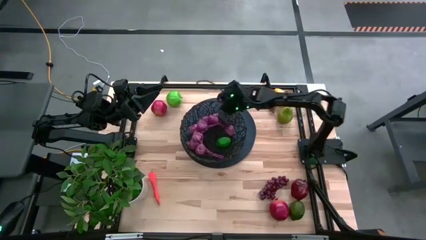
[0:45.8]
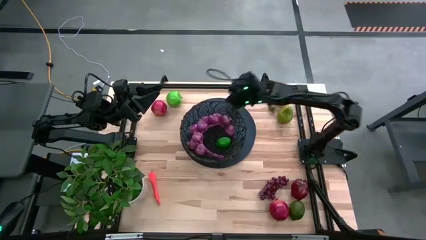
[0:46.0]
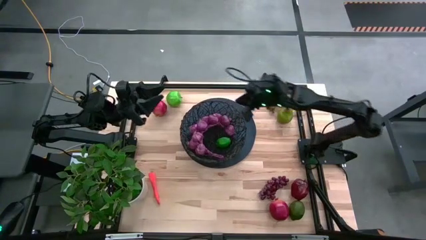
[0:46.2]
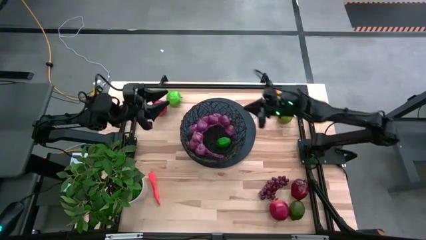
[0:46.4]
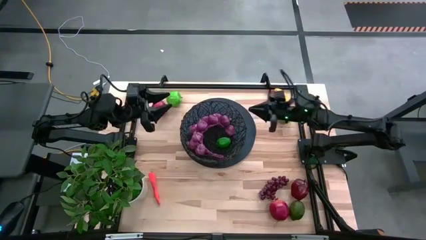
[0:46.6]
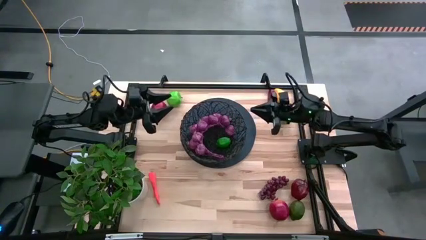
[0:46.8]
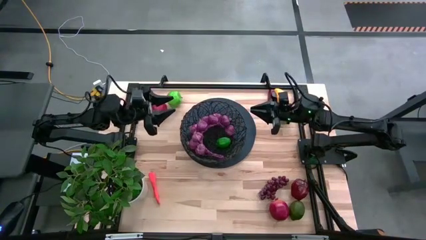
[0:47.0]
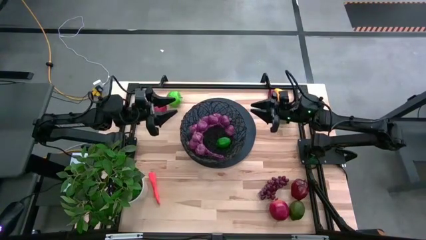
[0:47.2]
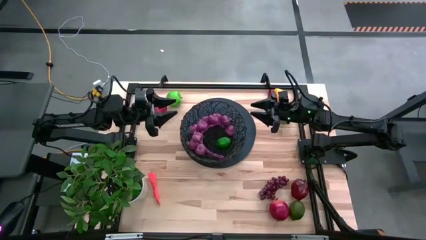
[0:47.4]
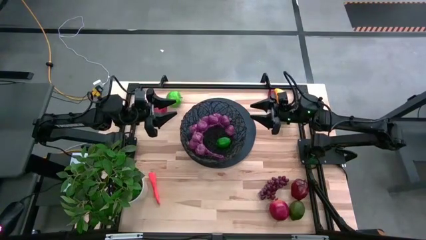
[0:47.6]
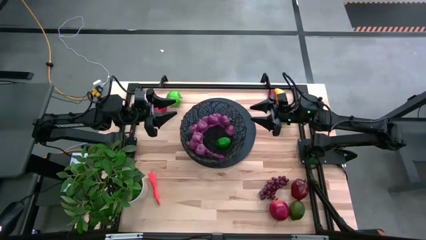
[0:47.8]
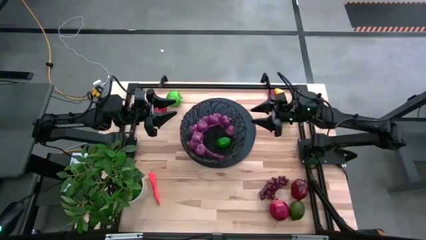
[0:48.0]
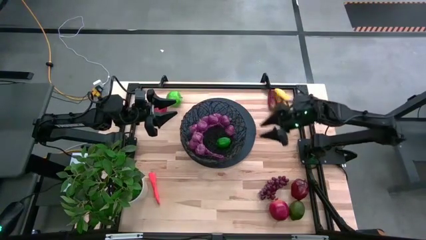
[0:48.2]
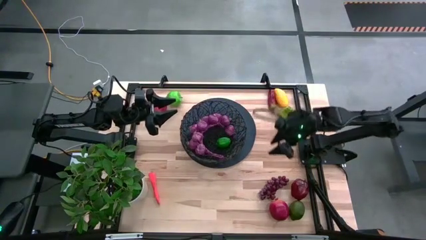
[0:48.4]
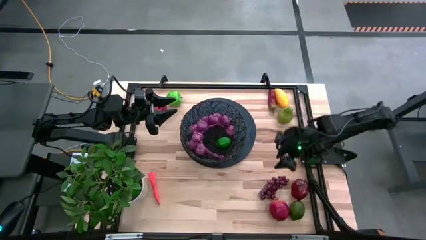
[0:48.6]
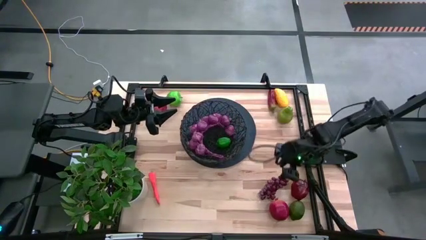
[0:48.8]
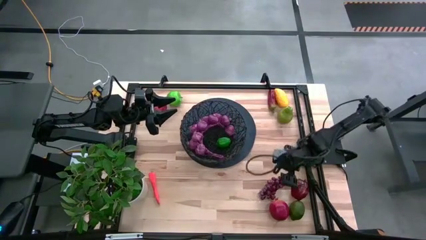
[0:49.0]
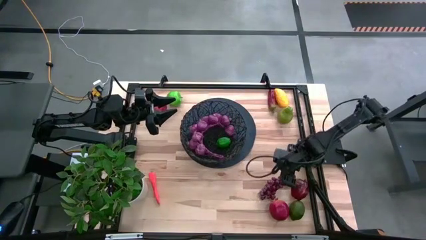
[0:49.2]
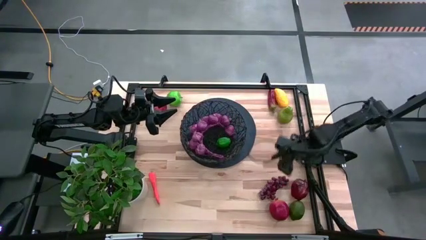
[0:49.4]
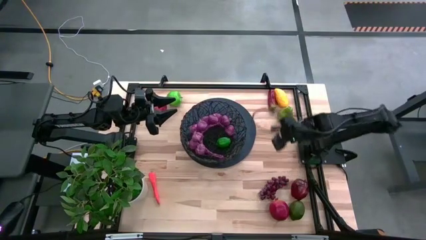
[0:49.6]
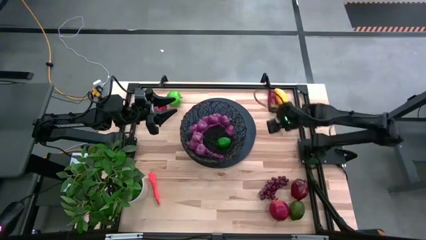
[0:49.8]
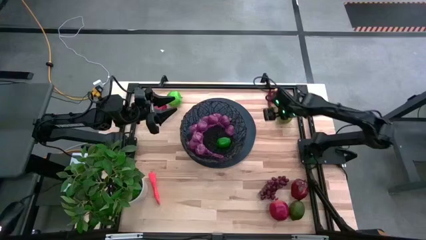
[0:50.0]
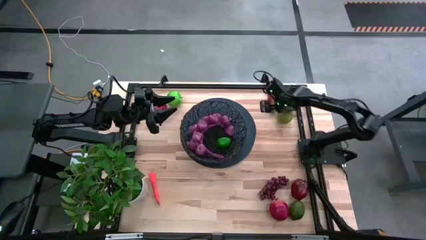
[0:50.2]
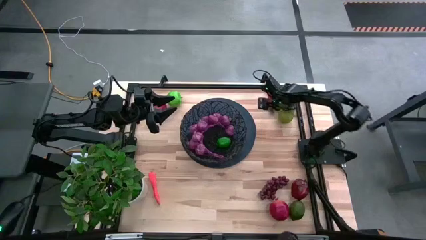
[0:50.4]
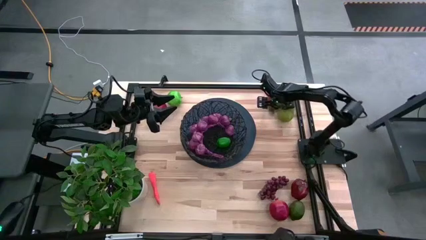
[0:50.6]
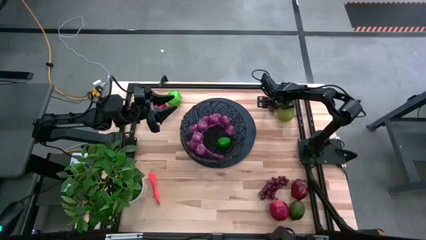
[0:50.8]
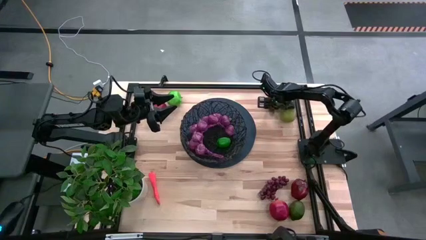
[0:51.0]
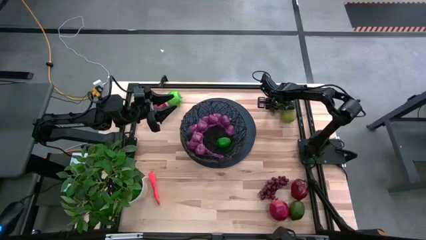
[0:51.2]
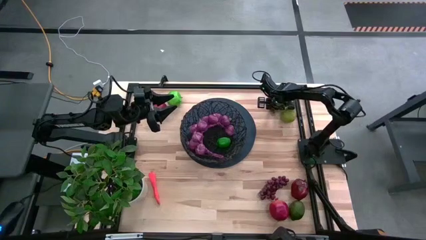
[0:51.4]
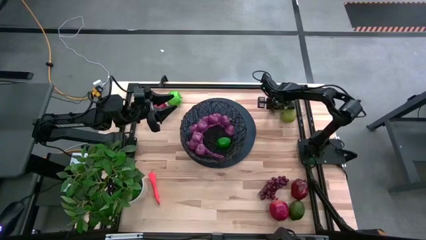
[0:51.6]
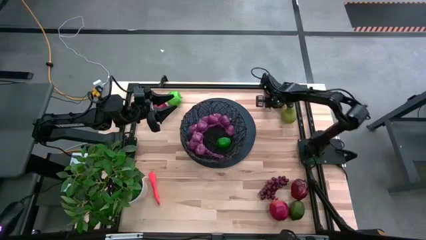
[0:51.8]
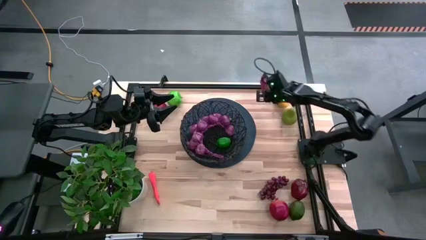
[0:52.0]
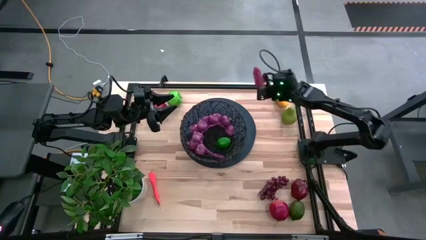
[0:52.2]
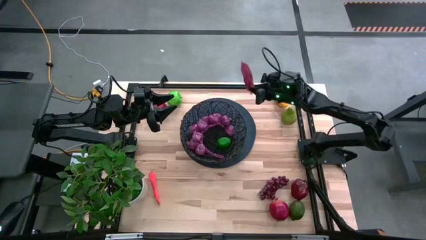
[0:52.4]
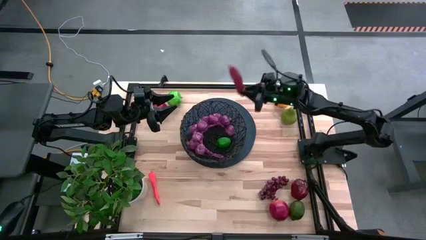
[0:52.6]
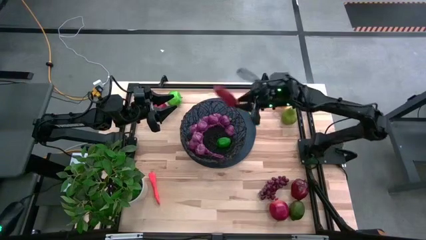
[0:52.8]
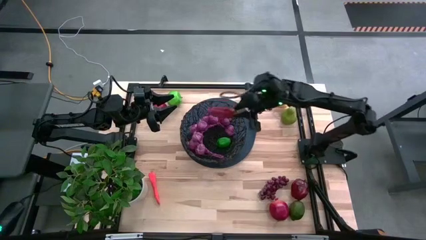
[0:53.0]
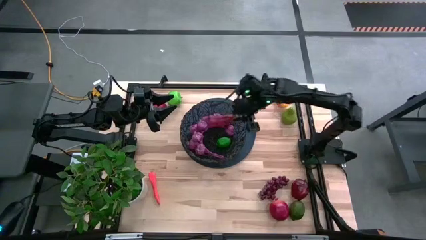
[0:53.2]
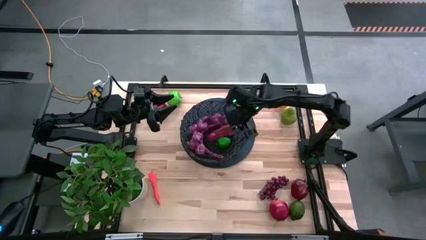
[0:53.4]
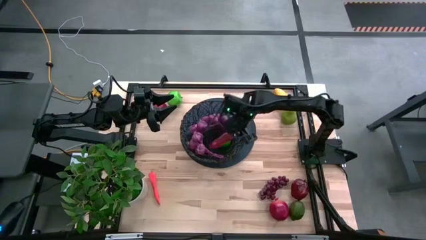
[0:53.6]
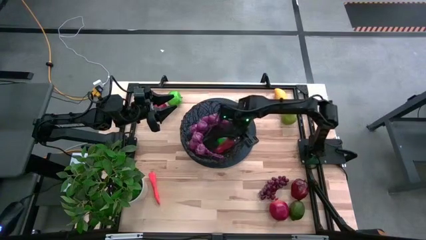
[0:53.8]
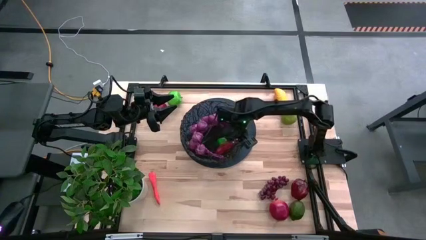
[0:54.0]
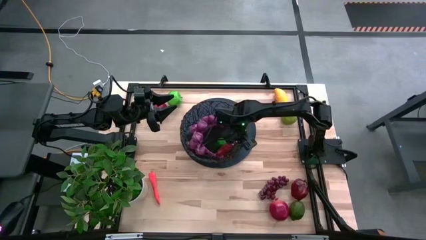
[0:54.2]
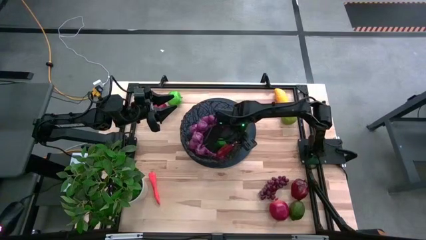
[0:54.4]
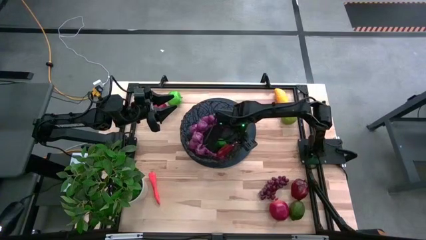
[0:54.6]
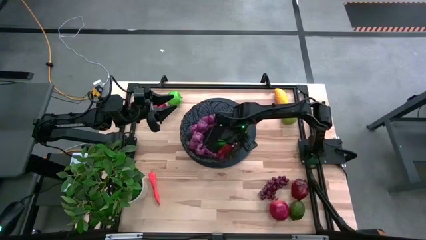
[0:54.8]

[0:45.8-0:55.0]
Task: Build produce basket
Put the red chili pepper into basket

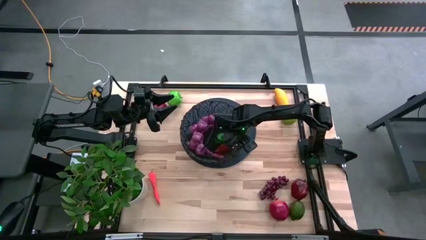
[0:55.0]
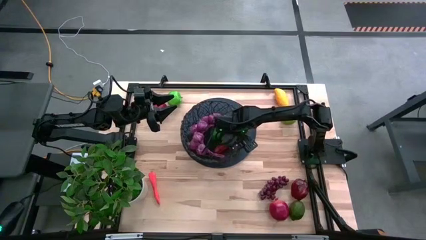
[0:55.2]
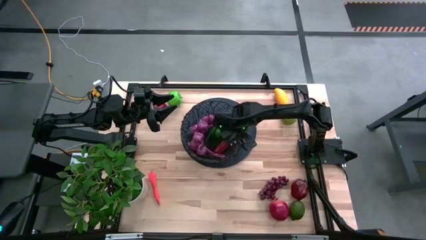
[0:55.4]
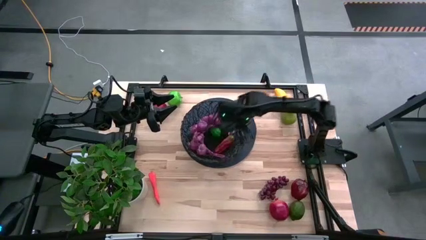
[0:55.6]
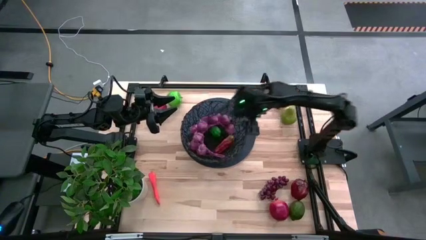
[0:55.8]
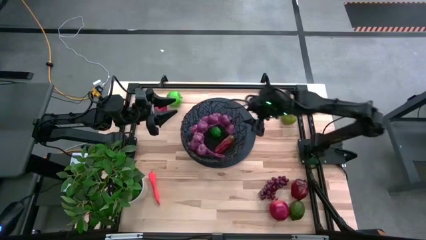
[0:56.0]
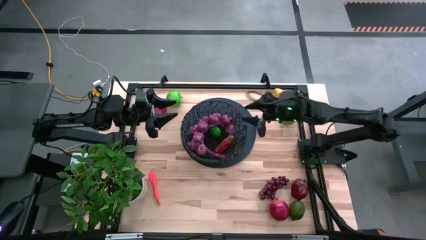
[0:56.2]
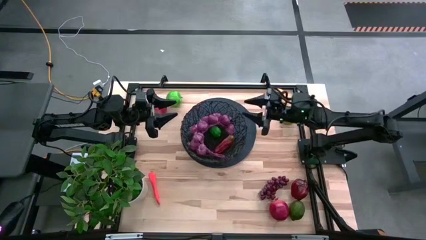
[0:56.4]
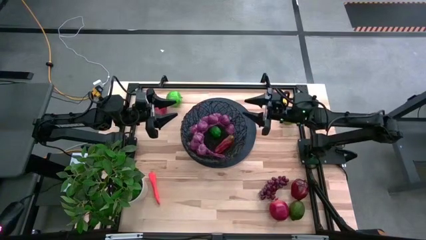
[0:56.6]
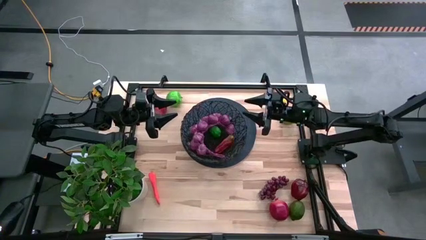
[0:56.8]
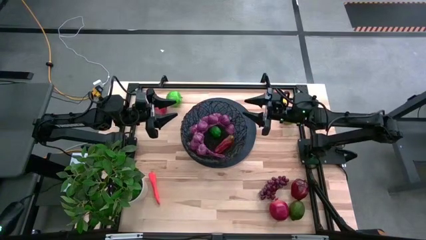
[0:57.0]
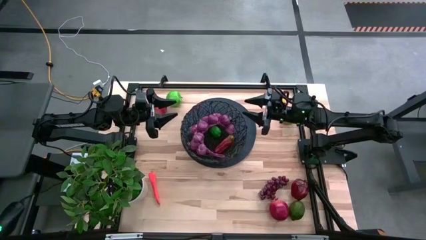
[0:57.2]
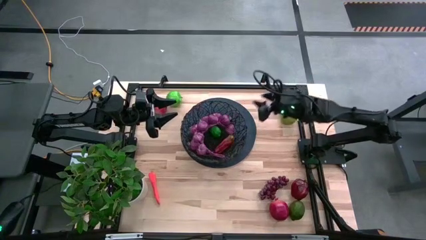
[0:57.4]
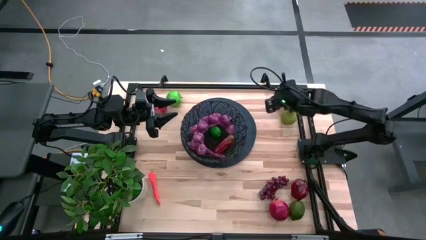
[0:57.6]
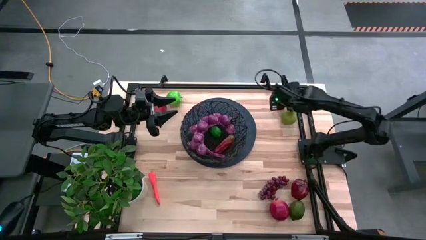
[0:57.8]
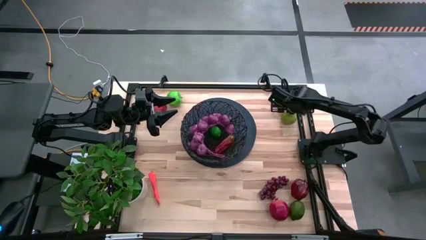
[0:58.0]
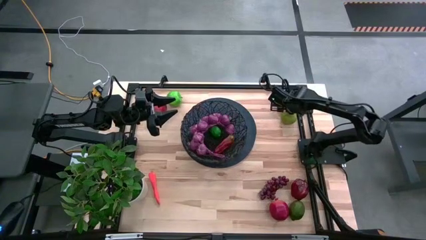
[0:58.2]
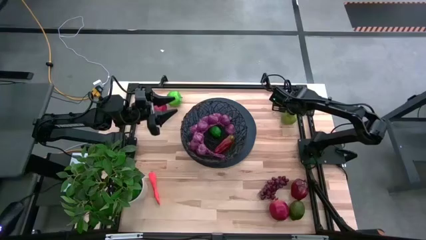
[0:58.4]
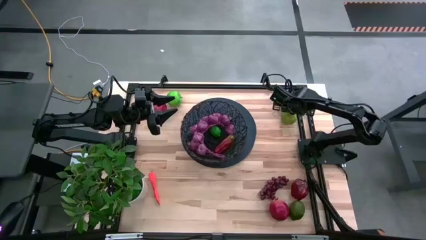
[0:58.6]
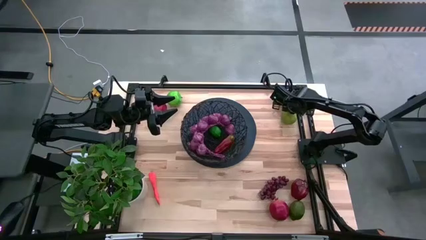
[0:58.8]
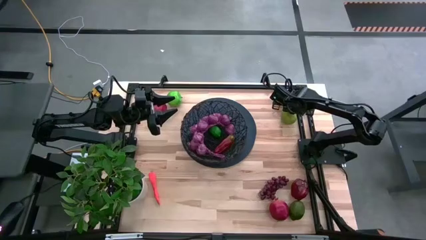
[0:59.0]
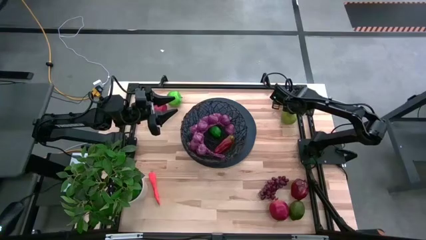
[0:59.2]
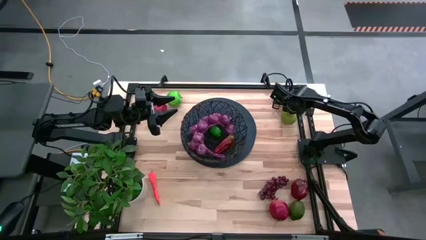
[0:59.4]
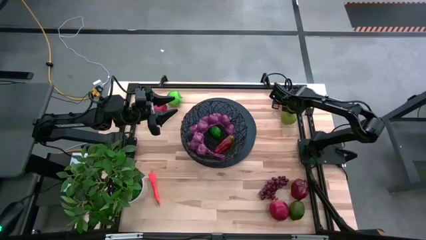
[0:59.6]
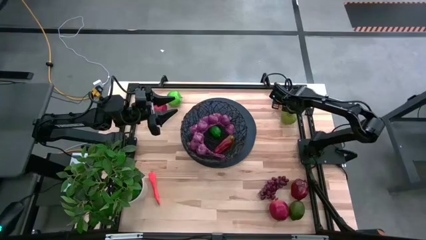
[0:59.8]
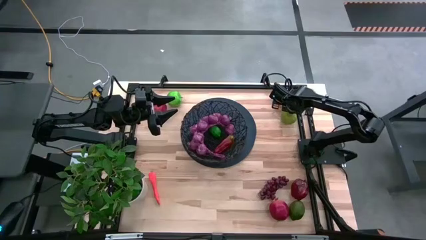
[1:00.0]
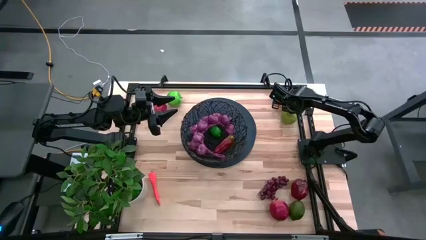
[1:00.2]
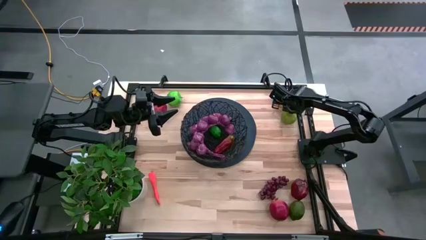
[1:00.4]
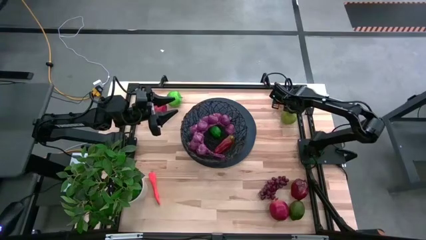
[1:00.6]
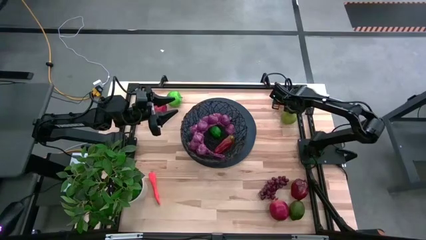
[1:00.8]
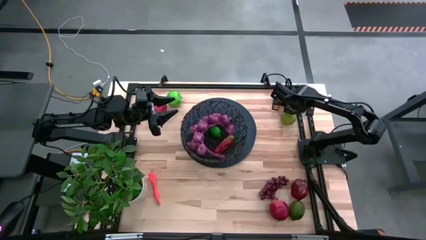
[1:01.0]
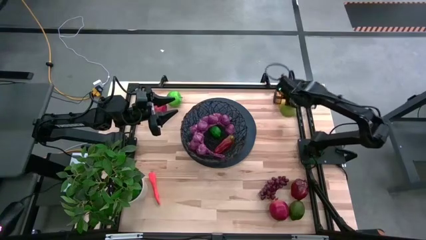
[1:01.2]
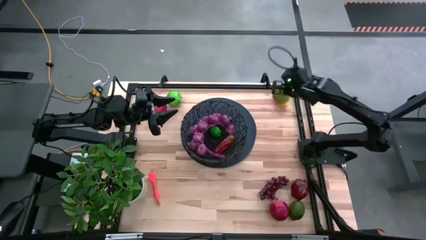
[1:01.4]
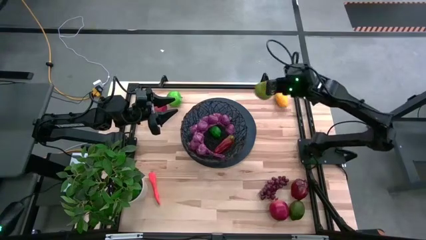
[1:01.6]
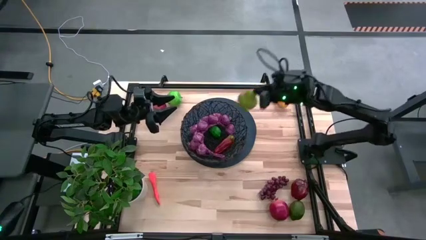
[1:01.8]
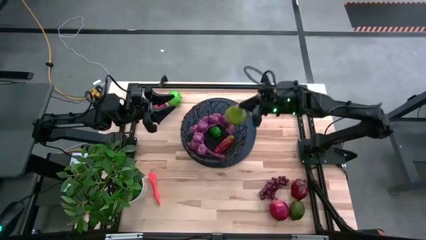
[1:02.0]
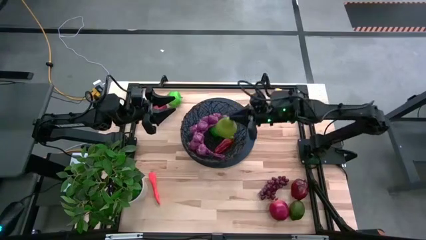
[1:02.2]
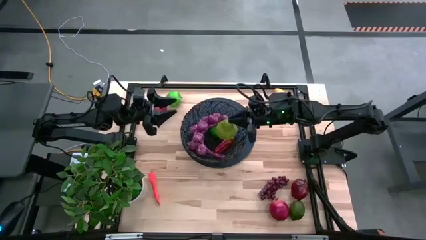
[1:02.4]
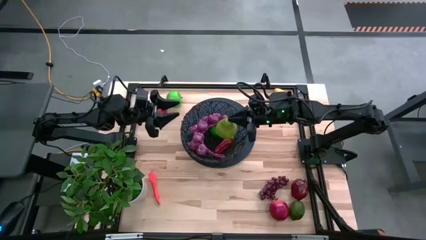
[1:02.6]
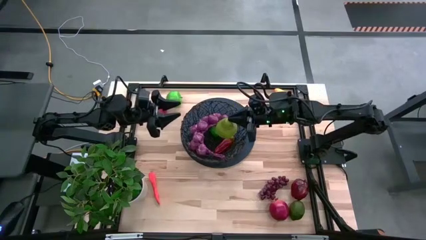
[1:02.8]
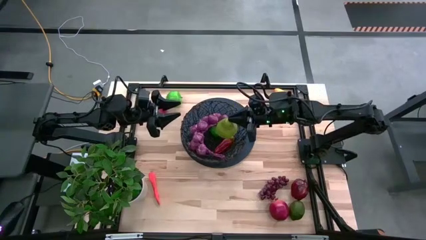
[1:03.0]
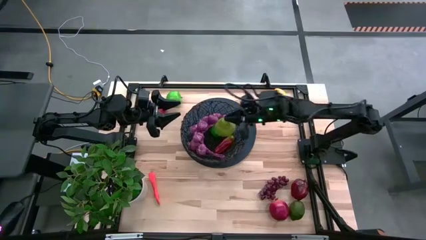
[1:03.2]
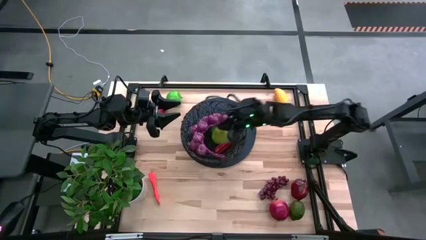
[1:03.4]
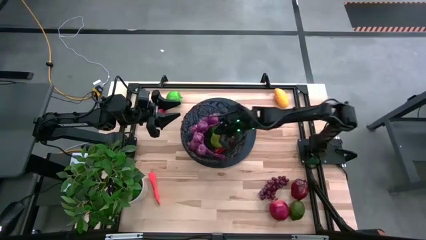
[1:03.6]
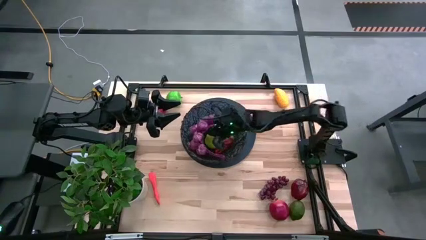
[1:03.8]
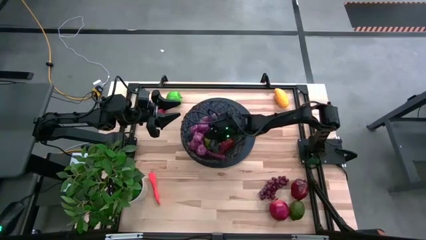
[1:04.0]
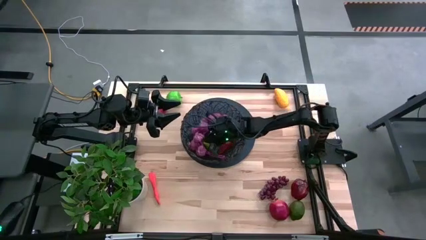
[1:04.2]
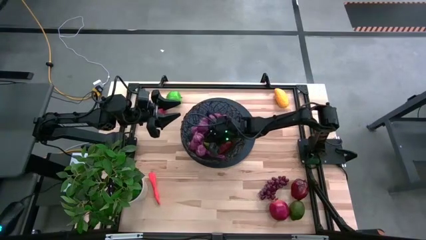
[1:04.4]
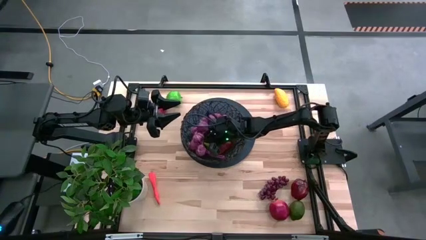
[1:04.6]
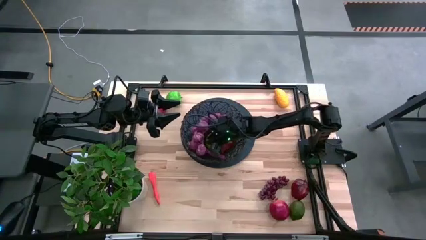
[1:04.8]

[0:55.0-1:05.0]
Put the green pear into basket
